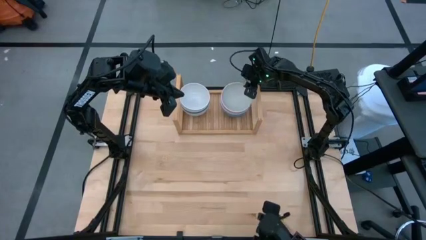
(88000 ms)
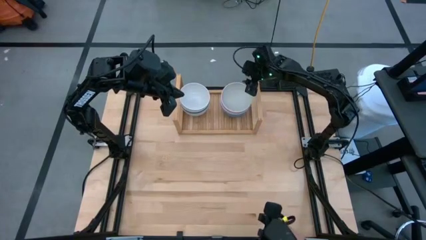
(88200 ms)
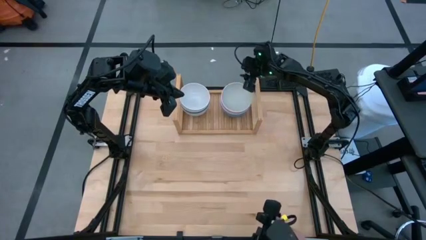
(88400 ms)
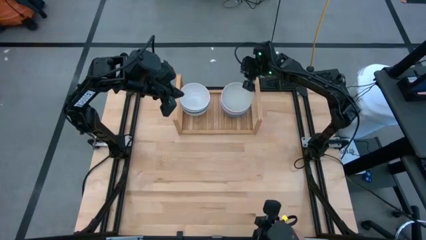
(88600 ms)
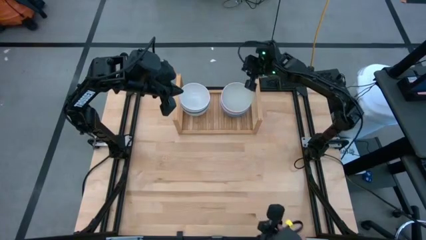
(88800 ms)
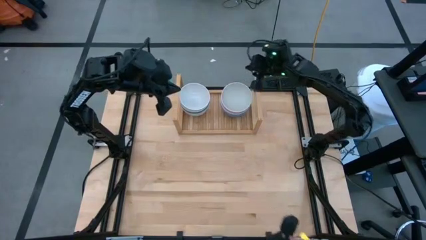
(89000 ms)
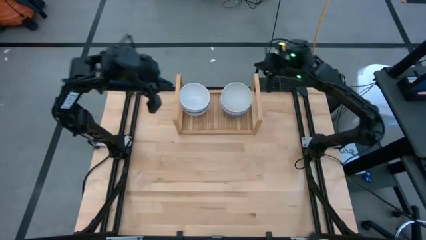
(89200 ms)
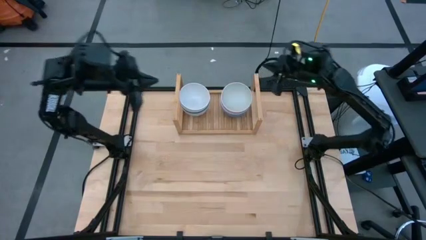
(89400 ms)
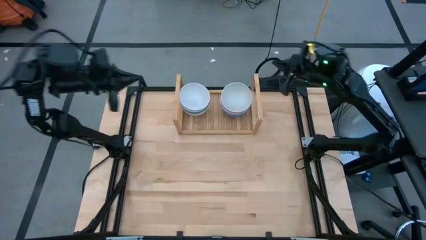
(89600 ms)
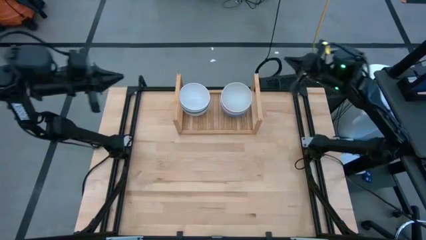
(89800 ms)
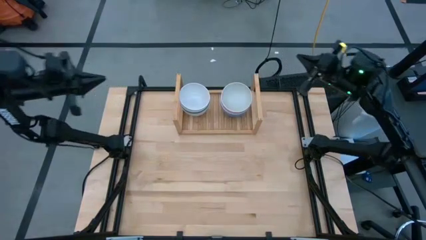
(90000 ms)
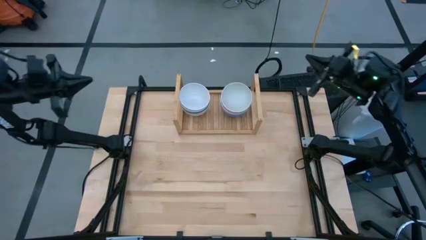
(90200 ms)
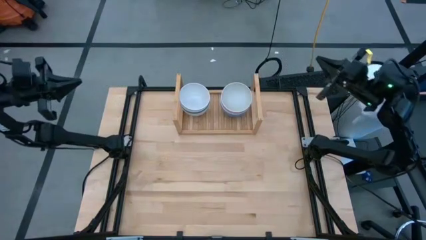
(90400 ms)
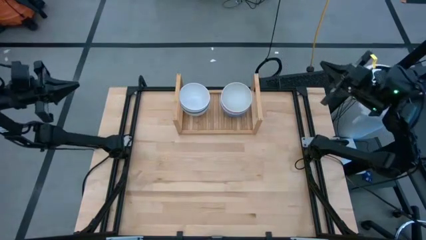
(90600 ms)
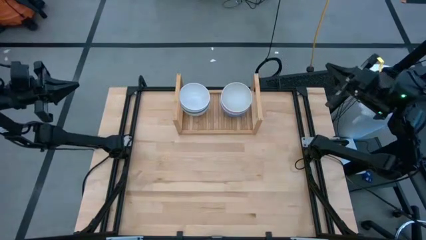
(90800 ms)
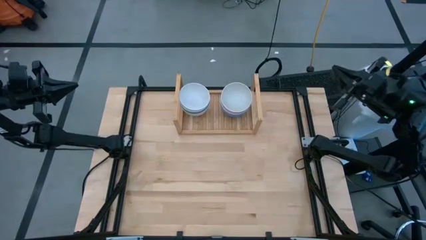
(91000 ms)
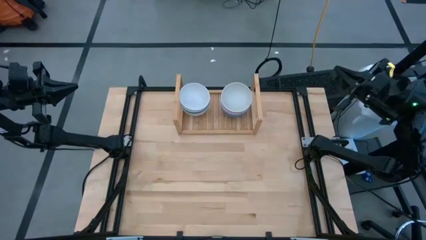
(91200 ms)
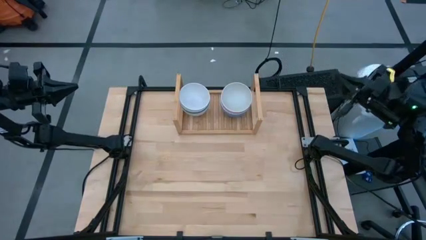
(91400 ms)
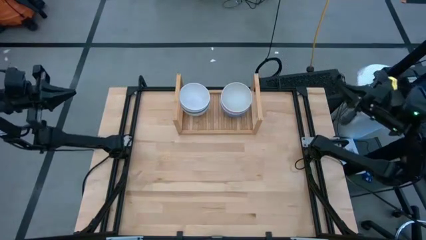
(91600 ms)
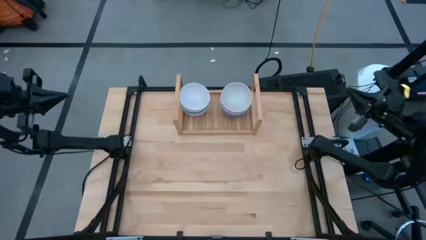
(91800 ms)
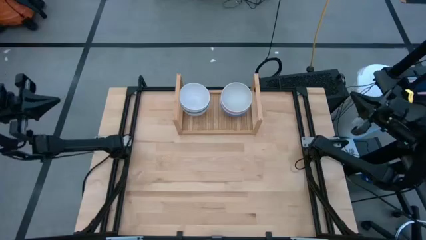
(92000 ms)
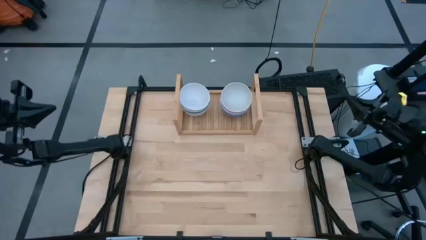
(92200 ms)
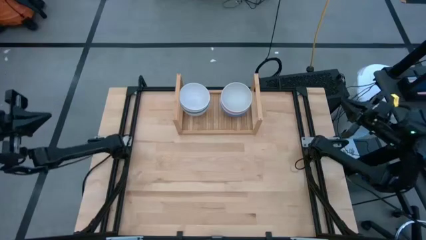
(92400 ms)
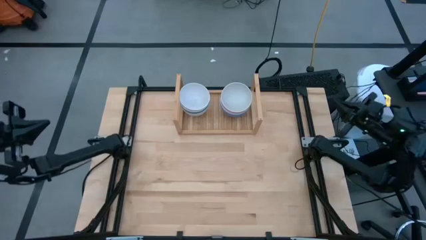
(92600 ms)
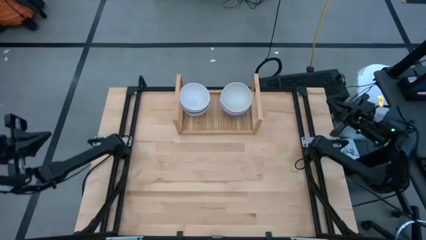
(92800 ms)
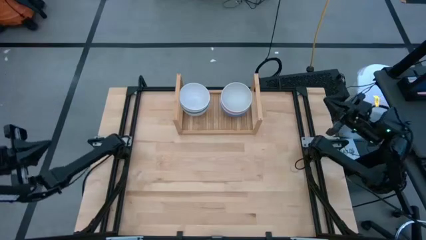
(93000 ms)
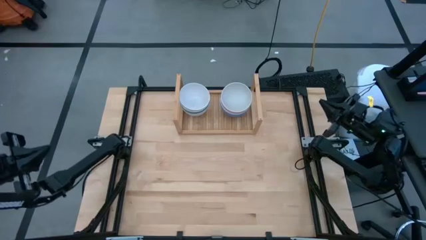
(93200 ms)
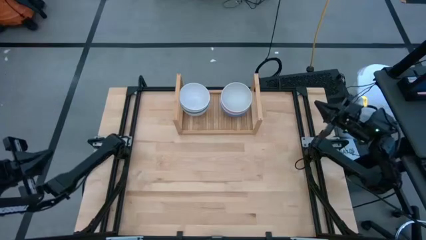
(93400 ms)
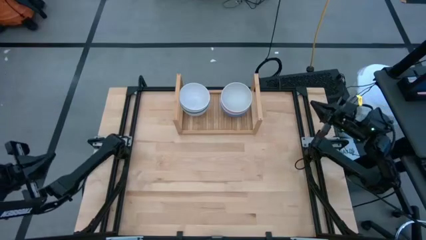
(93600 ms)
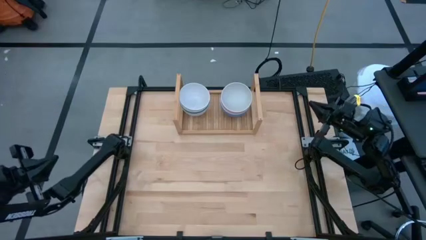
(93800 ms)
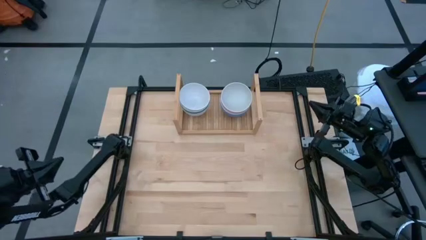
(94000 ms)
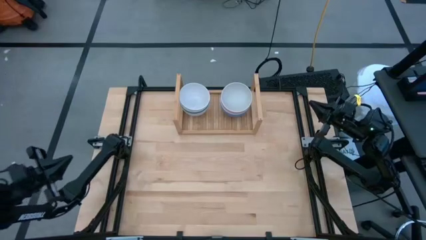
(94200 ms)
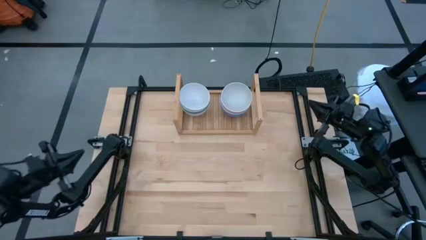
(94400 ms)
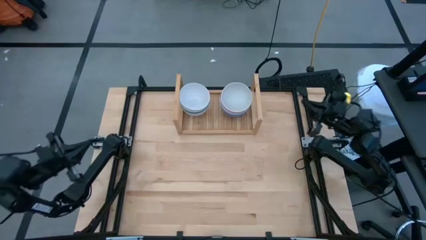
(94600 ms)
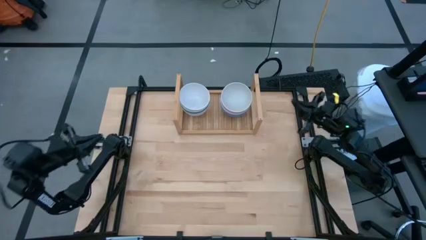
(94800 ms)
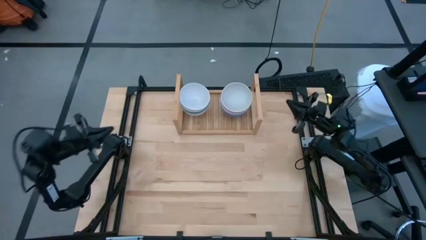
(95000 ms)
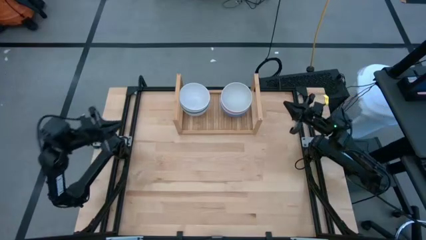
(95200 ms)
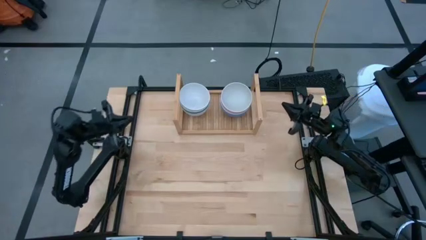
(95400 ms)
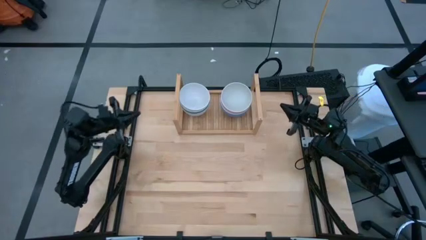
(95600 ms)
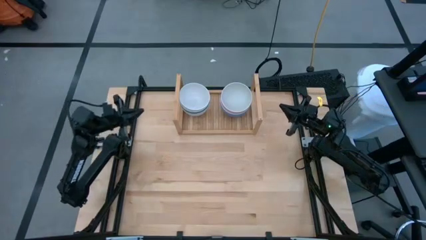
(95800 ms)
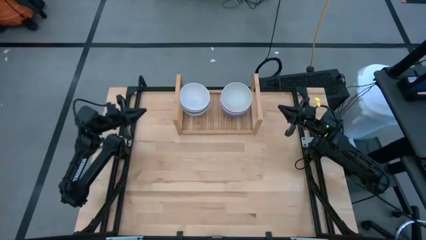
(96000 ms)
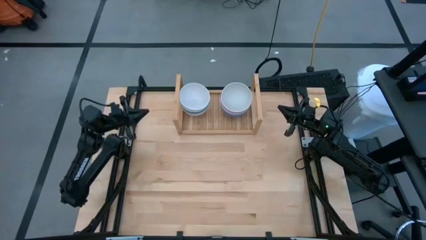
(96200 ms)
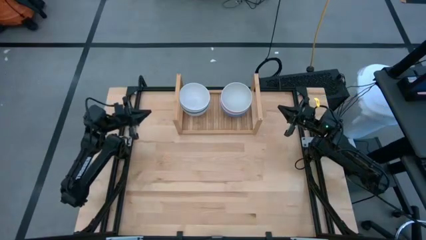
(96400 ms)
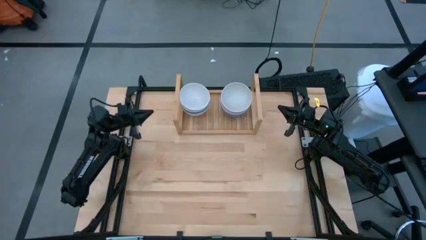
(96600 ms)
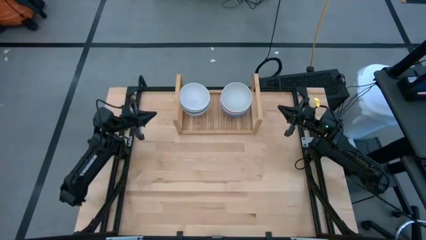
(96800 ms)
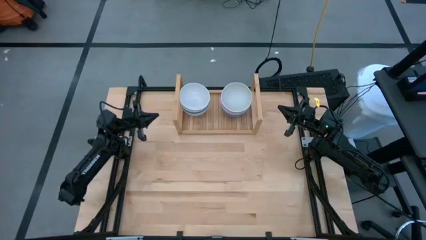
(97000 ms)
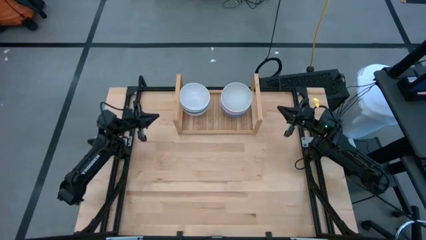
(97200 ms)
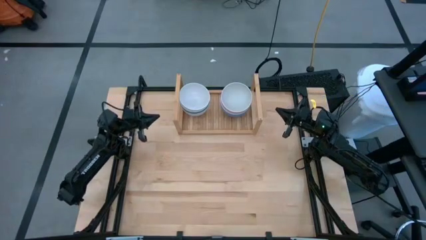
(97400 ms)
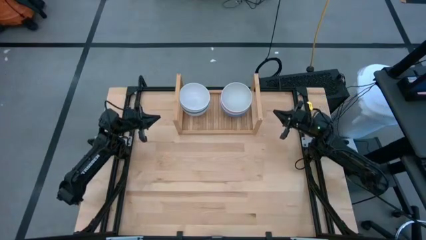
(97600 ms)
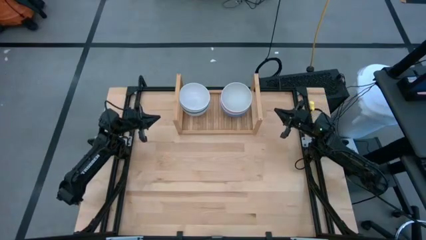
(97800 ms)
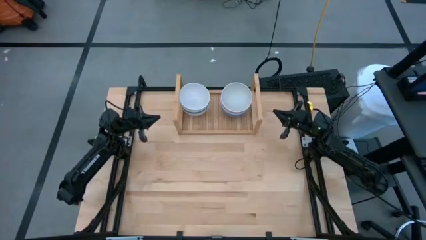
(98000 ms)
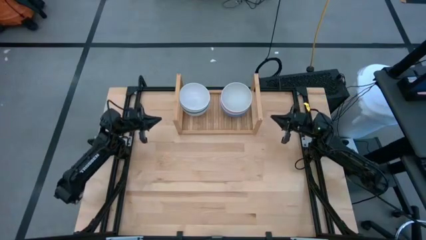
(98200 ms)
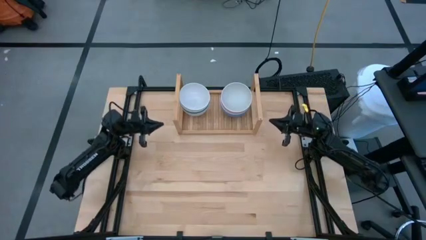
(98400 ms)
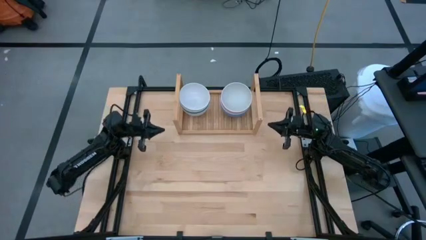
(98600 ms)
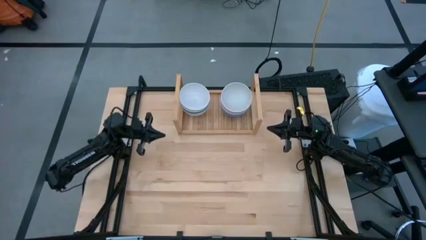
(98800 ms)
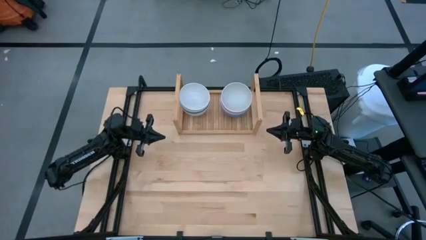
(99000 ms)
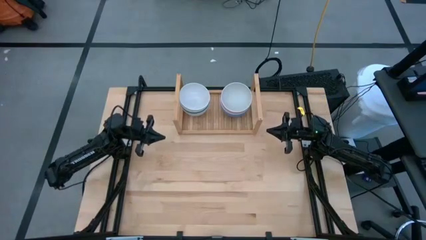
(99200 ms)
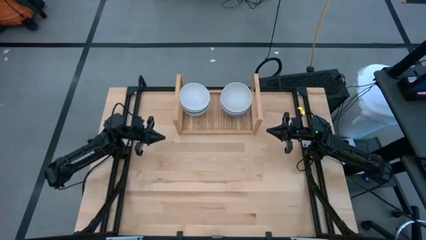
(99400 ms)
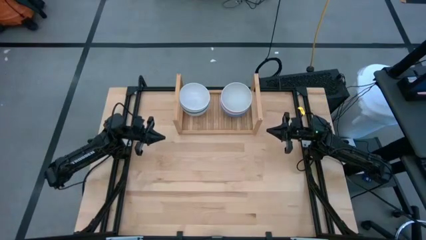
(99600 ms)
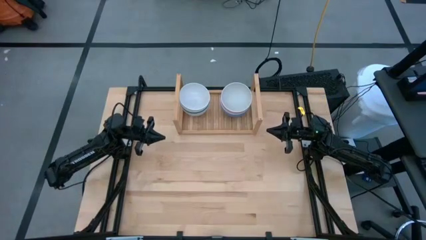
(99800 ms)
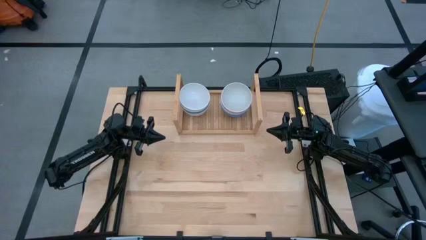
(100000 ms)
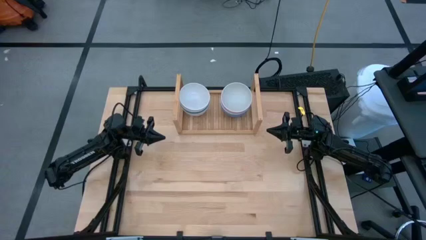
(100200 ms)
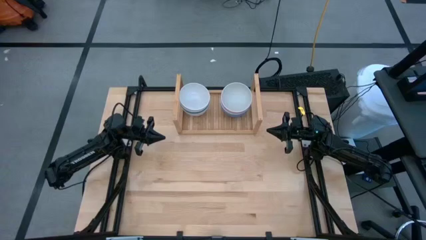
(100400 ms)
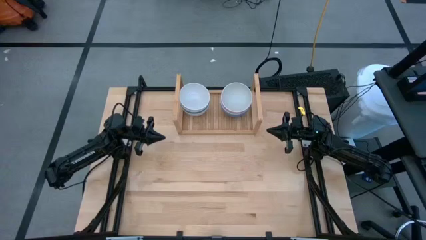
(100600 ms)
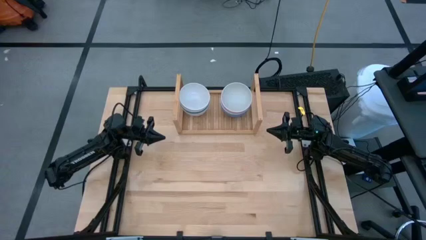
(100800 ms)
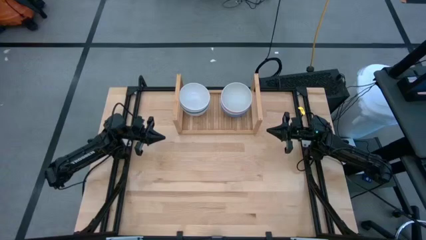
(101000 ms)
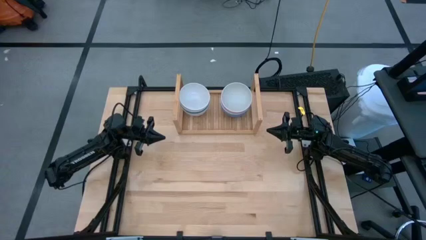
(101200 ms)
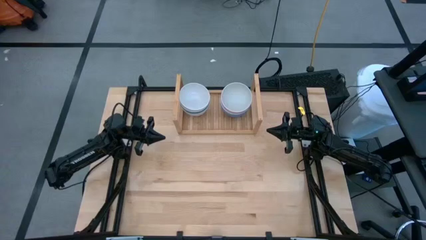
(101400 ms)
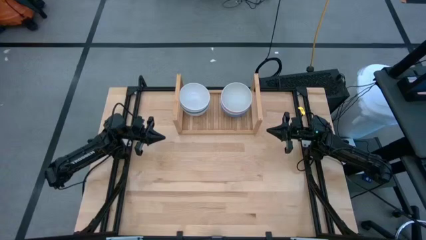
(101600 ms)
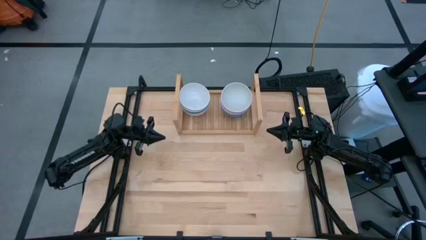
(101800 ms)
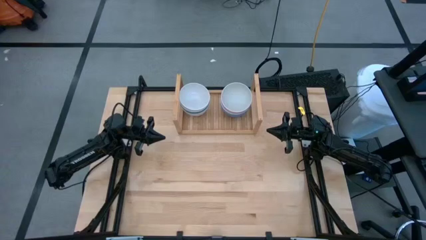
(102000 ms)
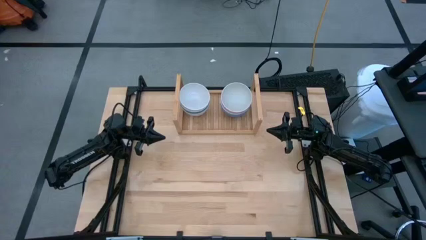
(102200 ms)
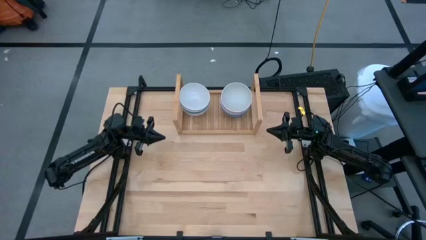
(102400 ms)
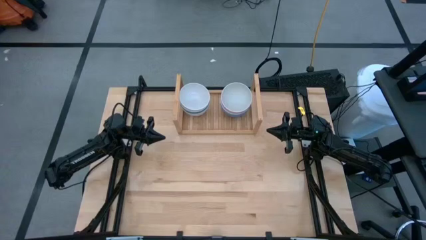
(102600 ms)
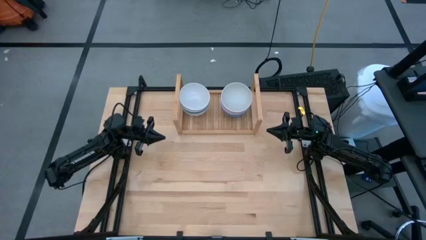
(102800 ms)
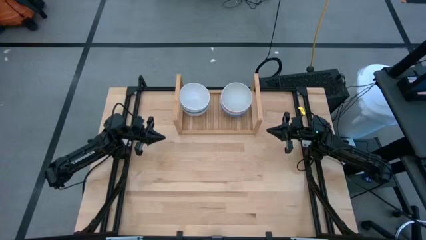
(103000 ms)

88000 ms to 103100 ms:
Task: Place and stack bowls onto a shelf
Return to Home Position
